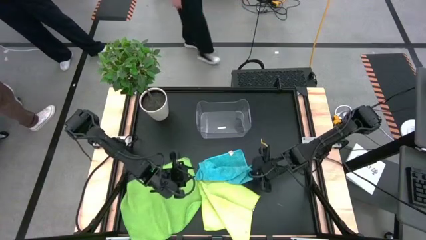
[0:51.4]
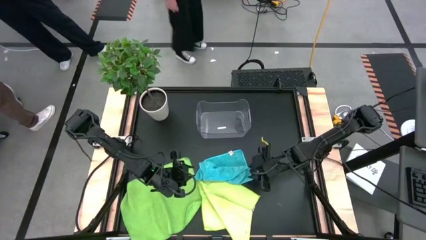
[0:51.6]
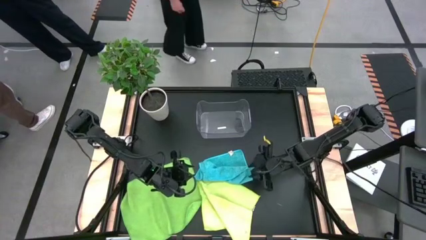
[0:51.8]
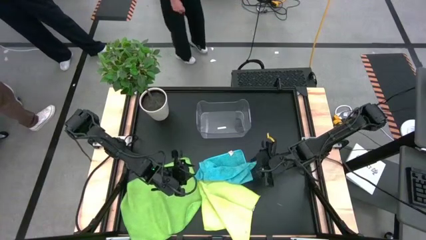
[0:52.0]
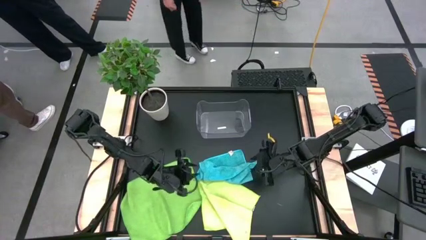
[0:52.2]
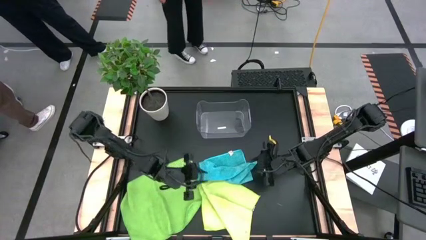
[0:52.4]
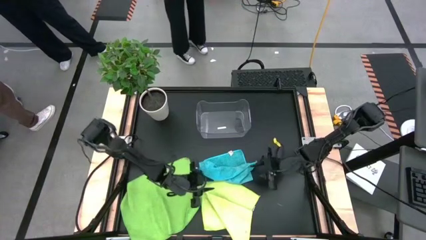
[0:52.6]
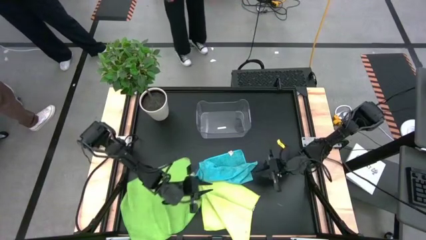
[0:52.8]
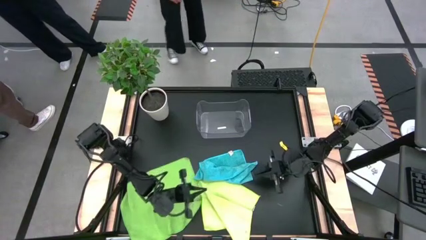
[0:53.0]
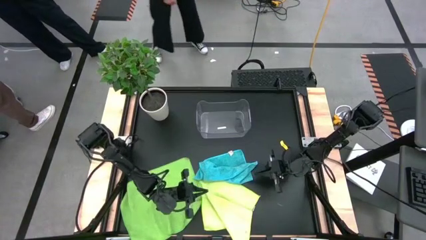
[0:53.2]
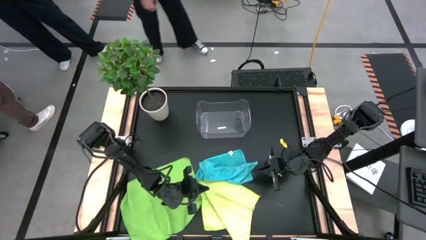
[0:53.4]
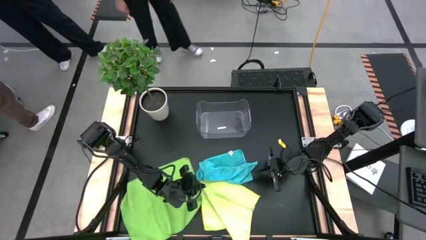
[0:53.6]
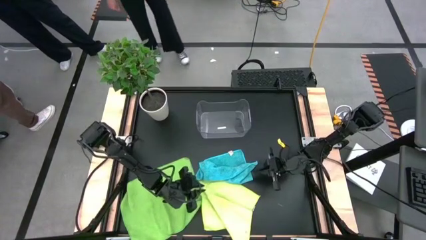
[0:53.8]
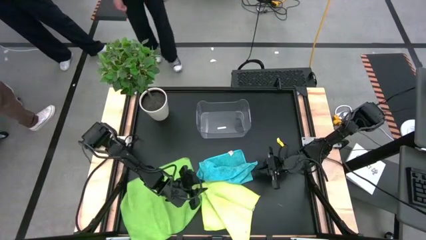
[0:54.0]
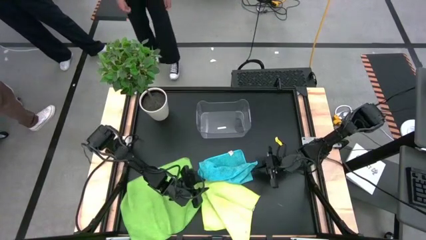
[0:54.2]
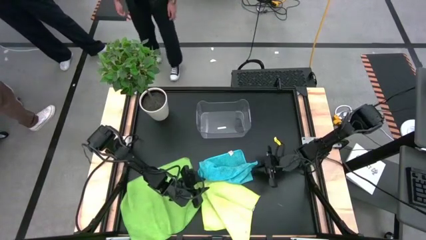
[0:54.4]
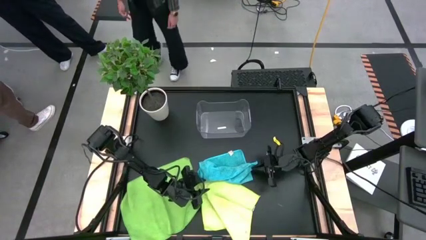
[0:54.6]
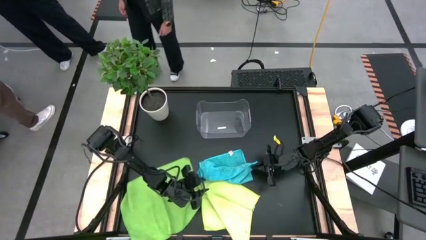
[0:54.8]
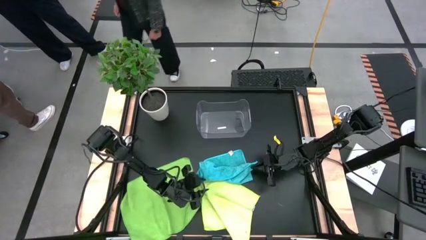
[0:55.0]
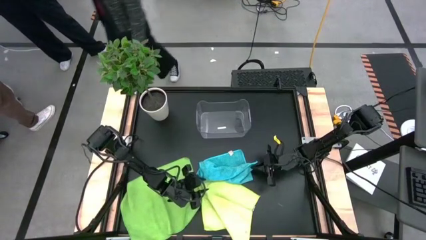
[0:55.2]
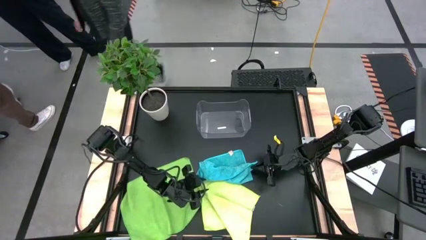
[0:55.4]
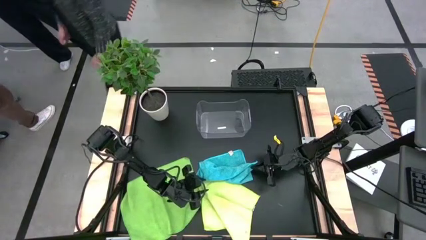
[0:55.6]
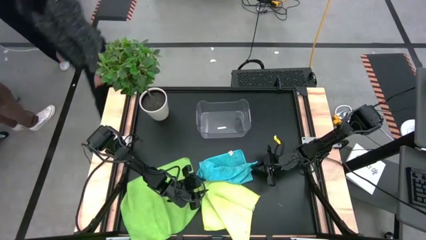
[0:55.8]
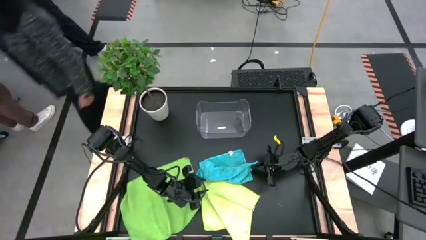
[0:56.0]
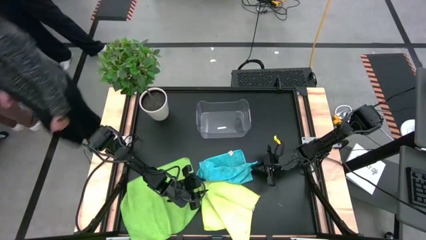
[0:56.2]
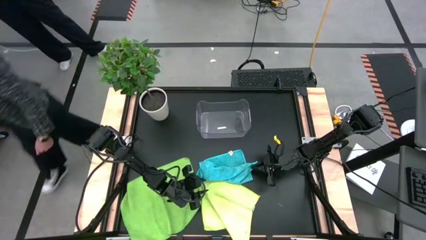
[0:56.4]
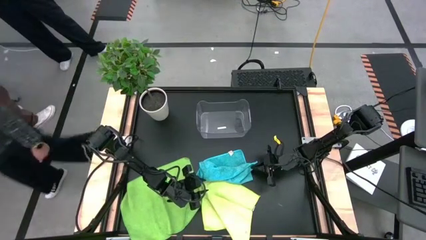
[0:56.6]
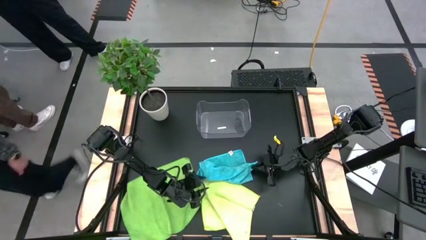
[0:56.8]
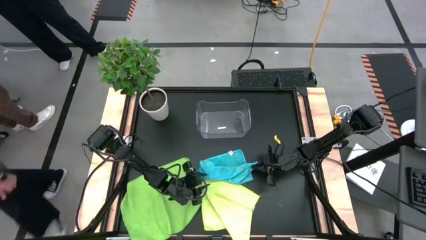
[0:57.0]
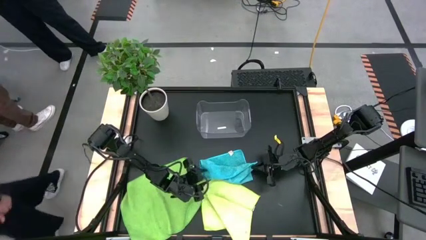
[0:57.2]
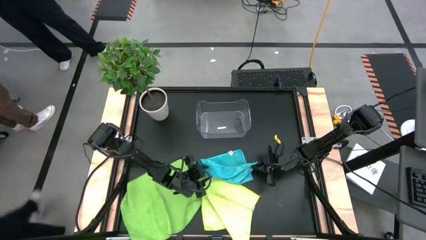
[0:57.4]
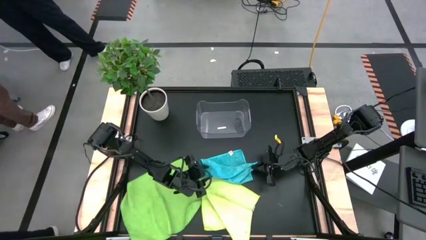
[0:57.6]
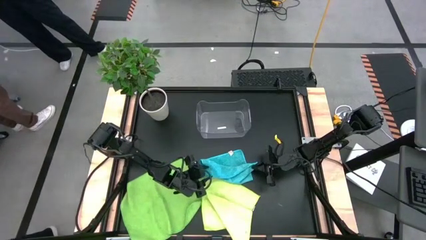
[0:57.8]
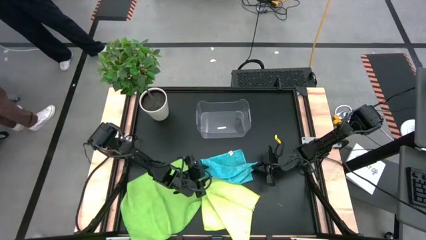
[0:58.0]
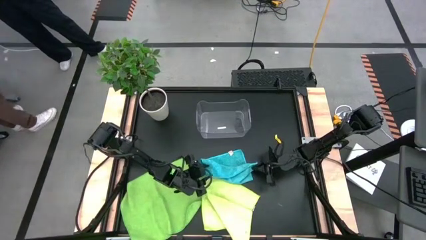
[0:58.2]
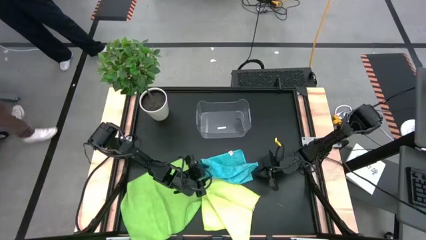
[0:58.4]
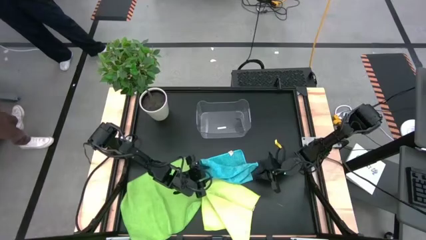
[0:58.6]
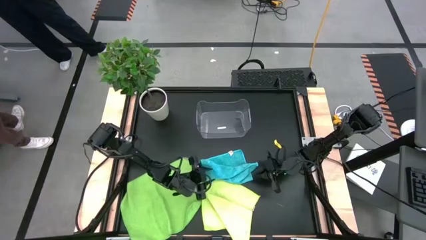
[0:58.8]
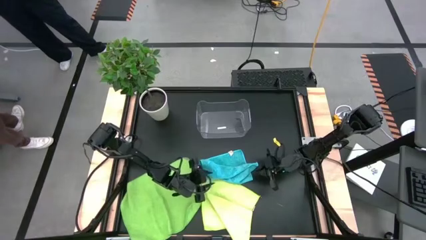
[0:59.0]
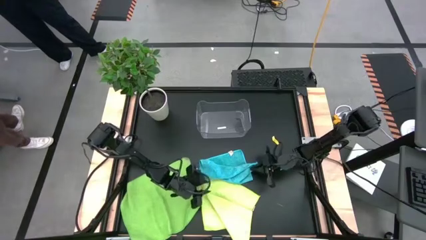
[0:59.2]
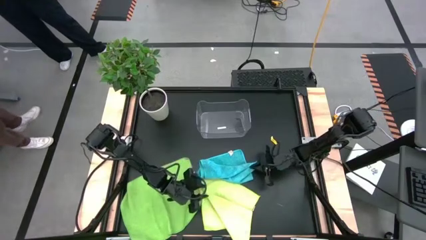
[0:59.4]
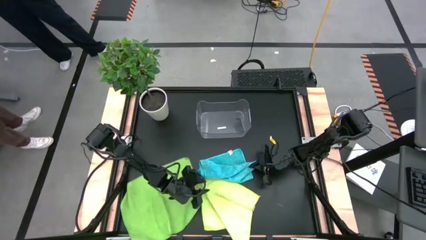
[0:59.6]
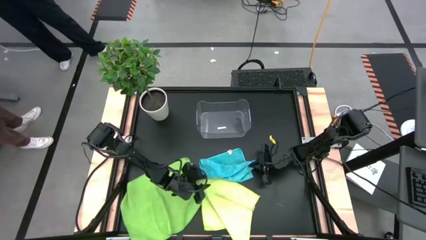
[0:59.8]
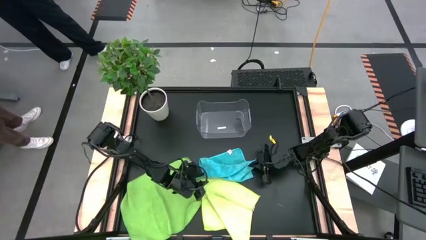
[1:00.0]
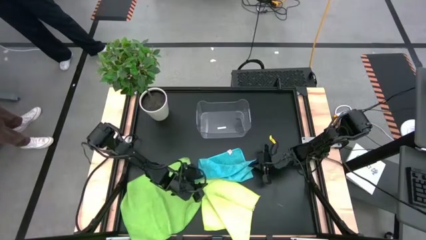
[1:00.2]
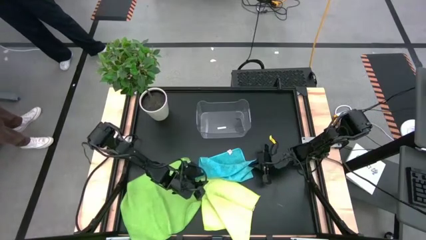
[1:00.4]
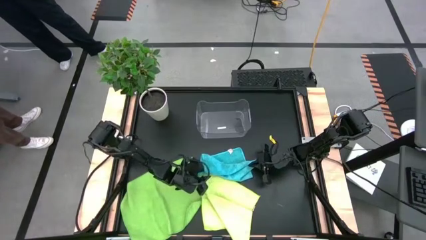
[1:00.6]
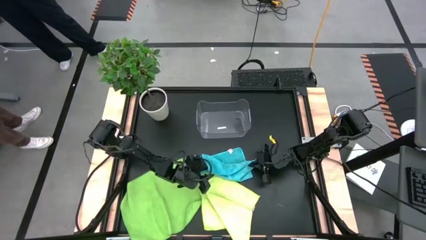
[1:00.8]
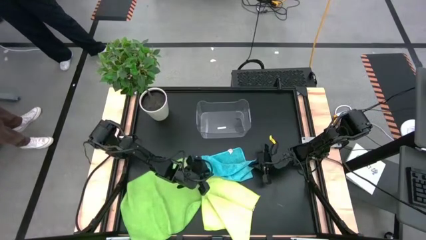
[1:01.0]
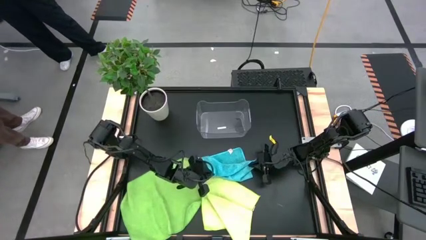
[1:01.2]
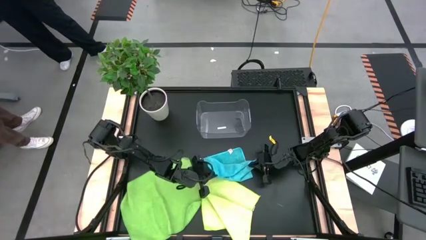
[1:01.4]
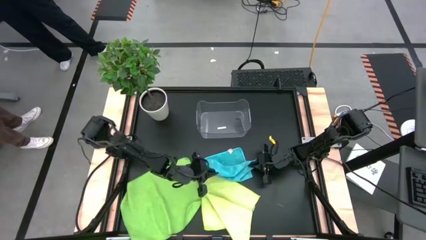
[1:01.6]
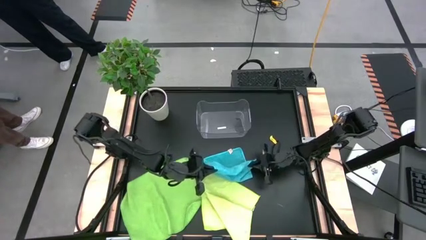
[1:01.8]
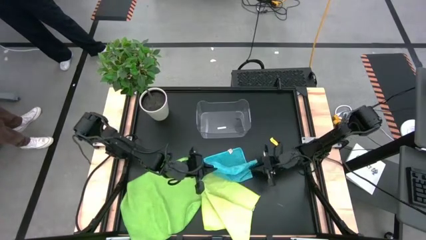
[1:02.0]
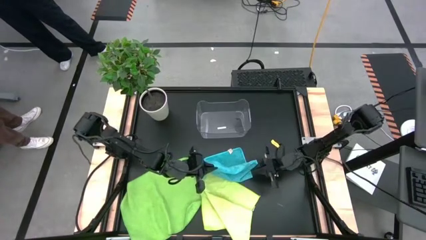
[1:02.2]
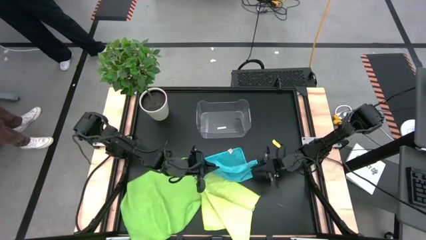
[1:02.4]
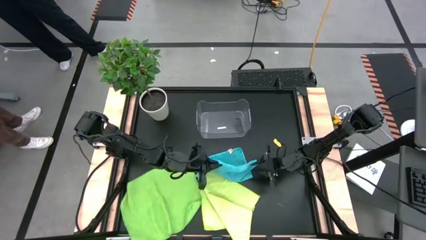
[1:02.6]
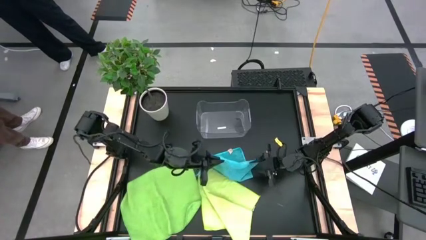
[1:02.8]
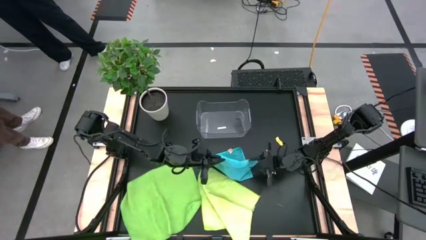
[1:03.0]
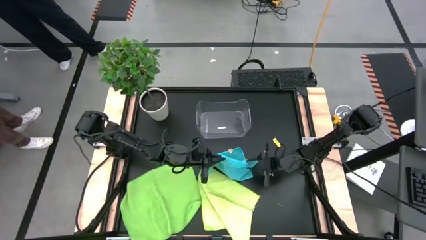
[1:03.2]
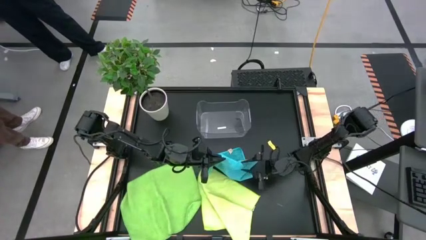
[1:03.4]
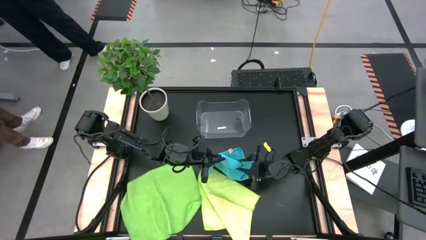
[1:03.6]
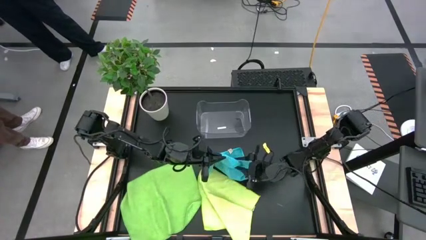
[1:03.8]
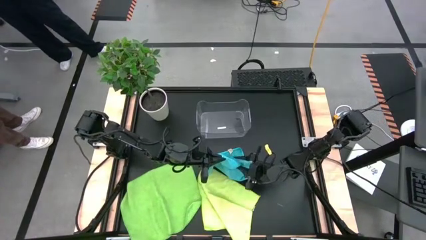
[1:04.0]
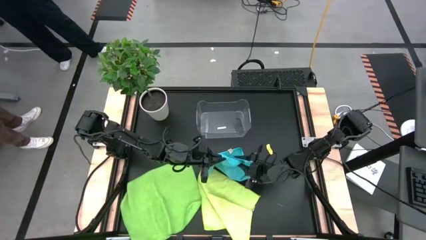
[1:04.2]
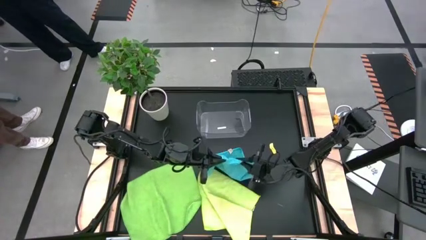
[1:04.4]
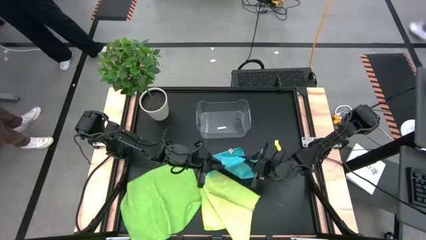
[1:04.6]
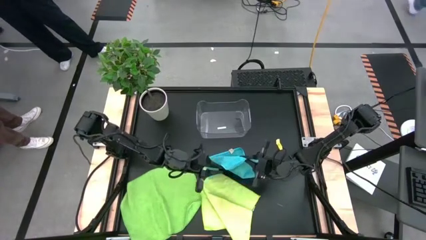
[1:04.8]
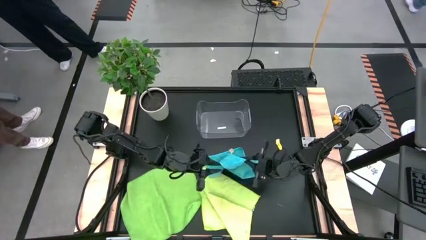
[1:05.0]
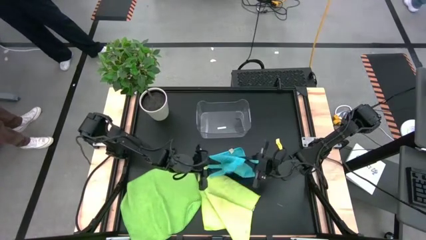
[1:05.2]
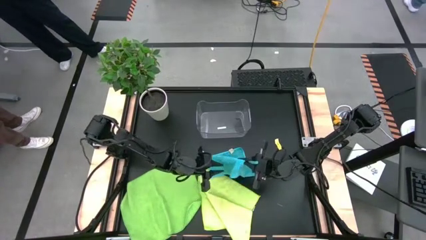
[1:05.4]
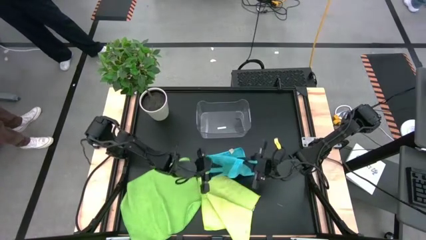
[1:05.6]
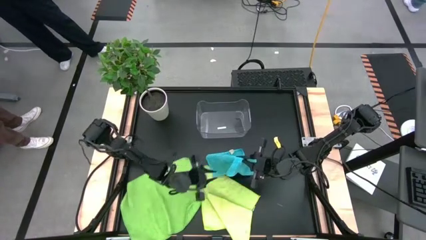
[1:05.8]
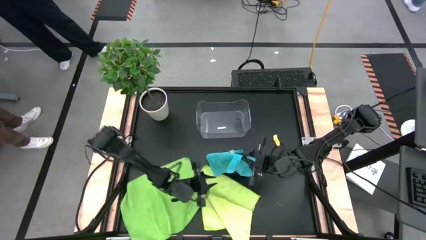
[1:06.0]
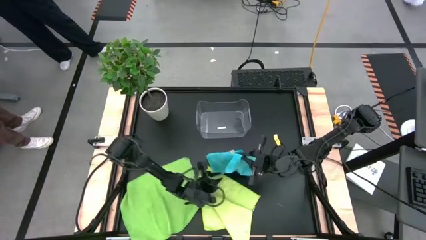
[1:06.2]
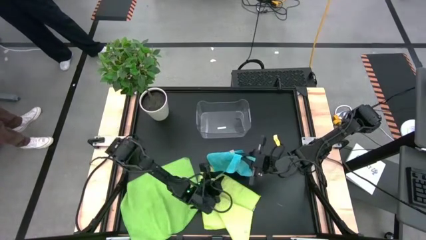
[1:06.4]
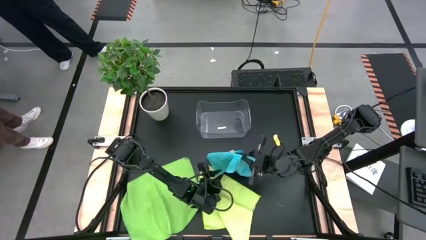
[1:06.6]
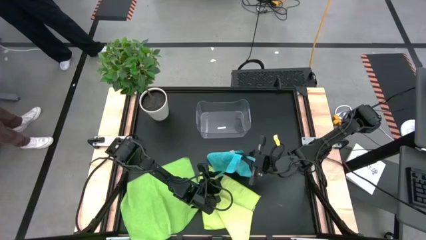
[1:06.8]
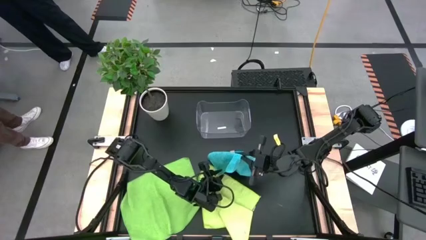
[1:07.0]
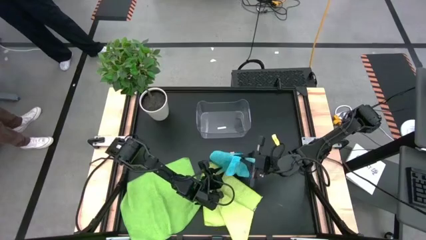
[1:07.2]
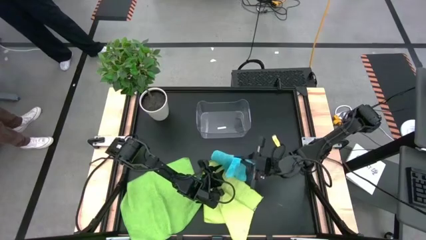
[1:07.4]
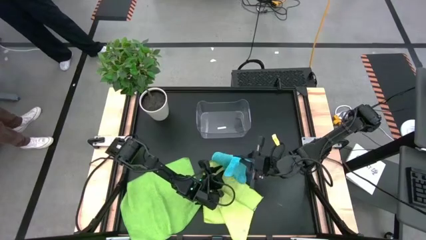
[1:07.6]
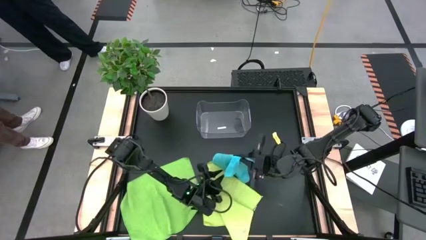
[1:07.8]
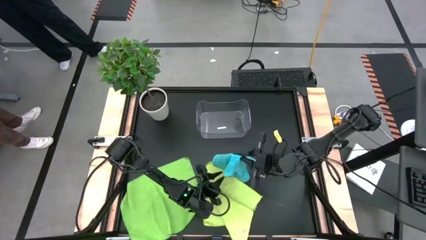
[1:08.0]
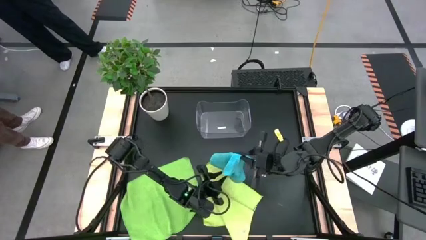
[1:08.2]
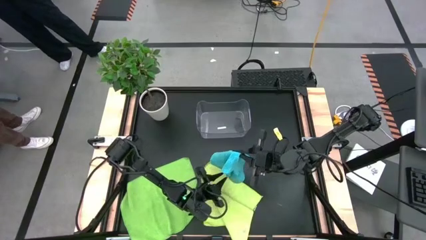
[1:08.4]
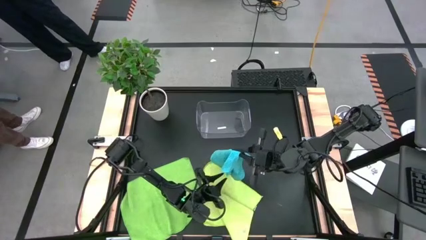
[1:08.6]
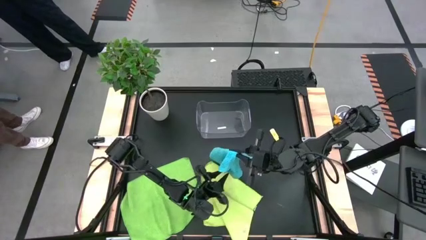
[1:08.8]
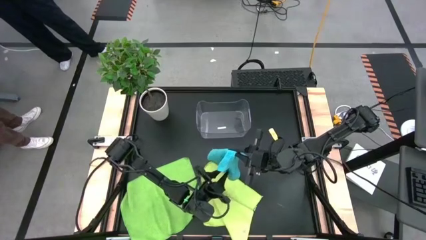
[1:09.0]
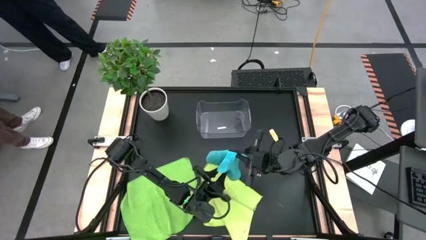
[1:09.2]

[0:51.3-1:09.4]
Task: Fold microfiber towels
Fold the blue towel
